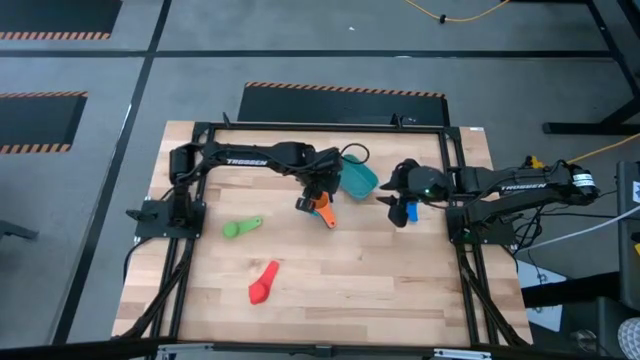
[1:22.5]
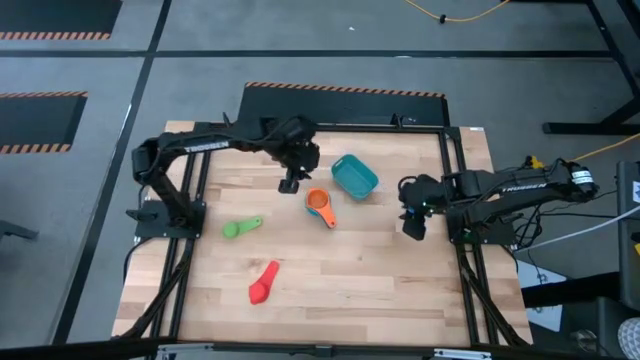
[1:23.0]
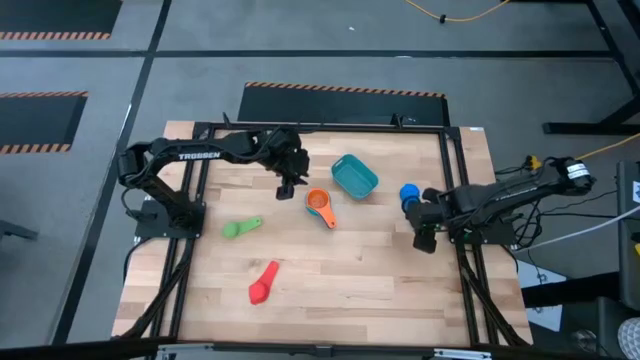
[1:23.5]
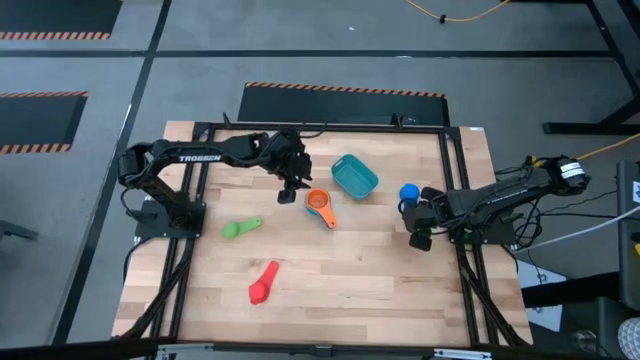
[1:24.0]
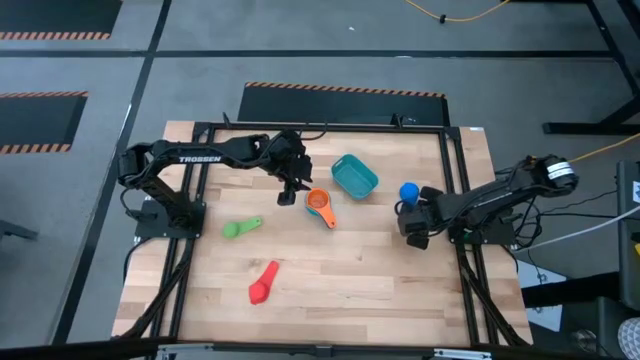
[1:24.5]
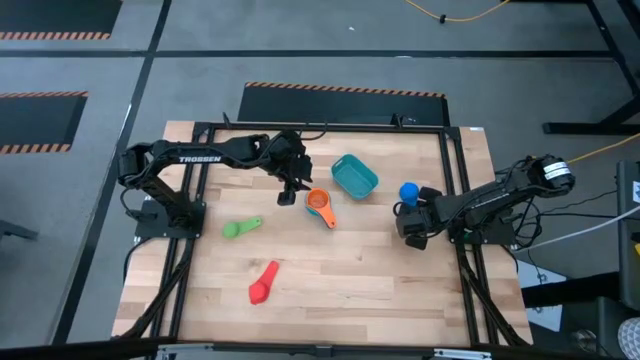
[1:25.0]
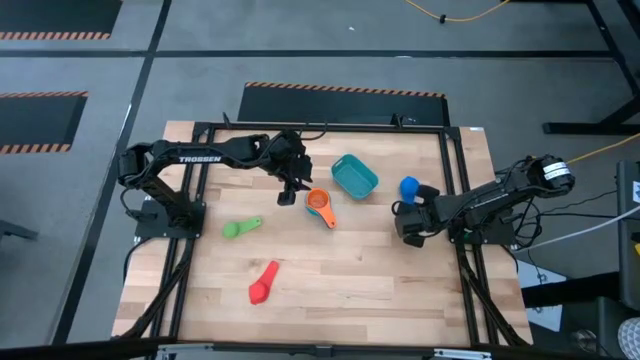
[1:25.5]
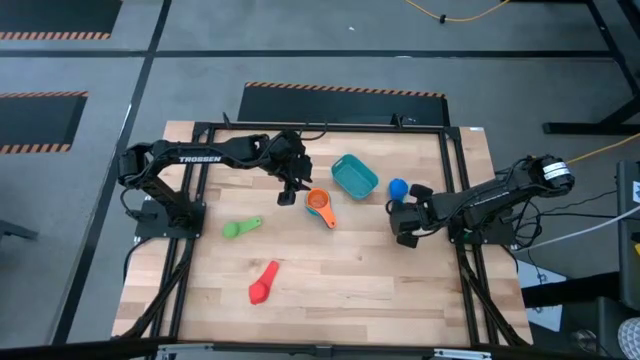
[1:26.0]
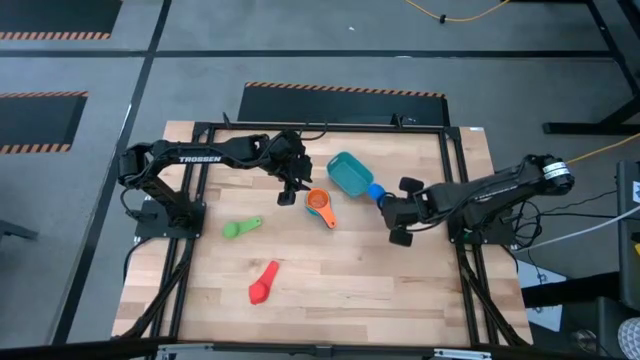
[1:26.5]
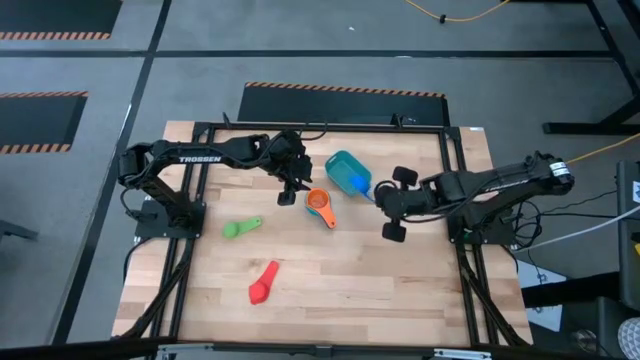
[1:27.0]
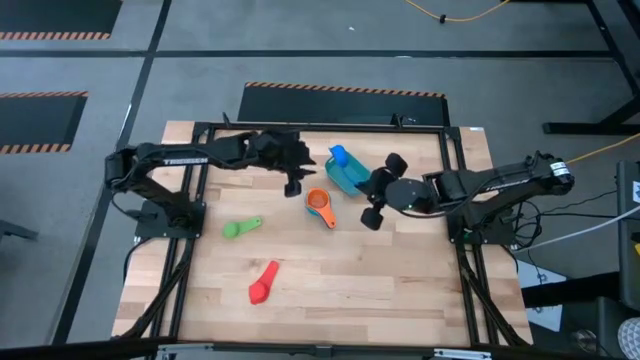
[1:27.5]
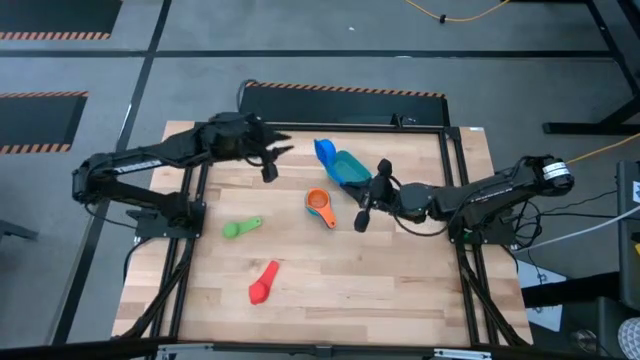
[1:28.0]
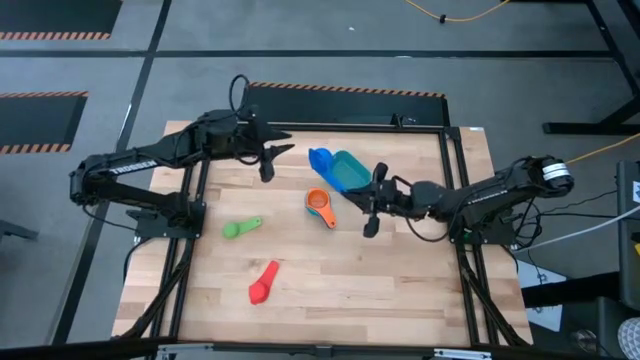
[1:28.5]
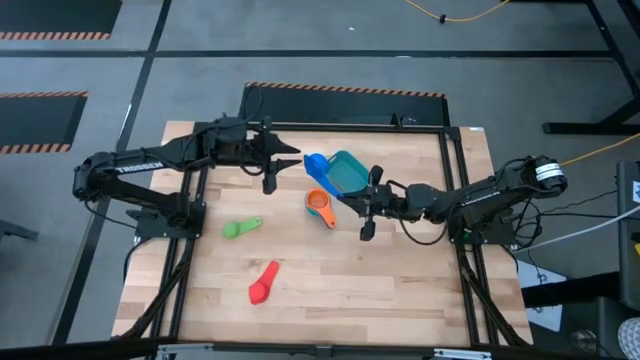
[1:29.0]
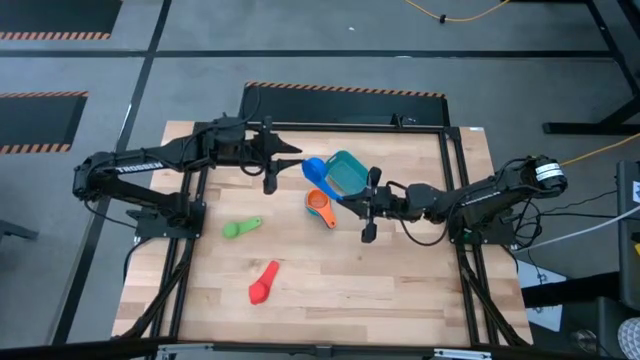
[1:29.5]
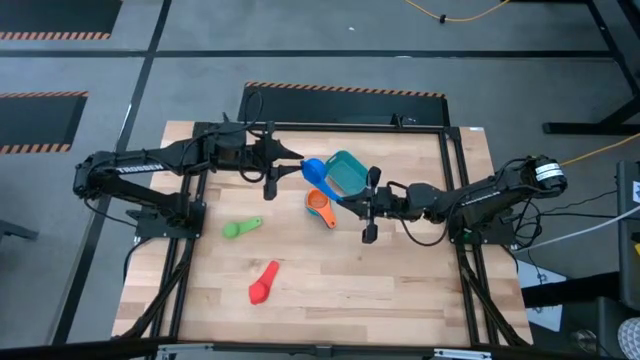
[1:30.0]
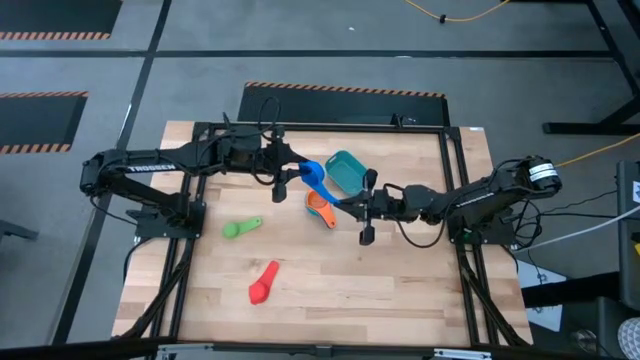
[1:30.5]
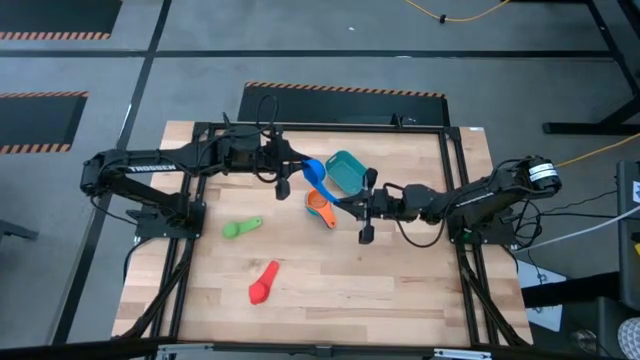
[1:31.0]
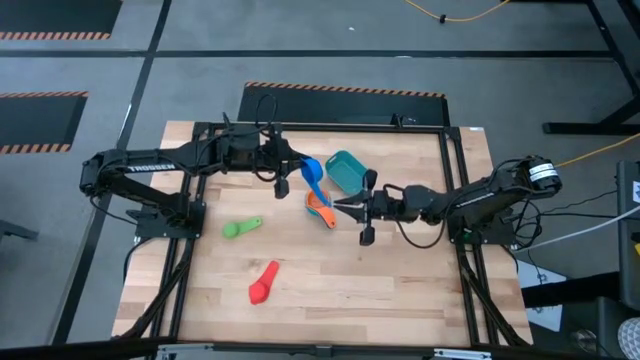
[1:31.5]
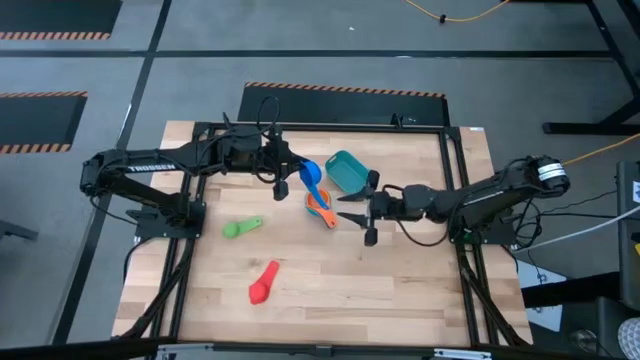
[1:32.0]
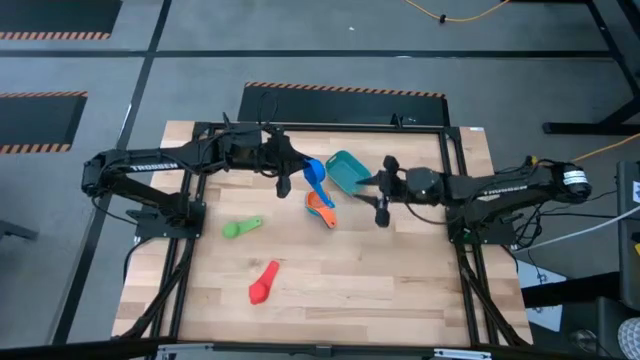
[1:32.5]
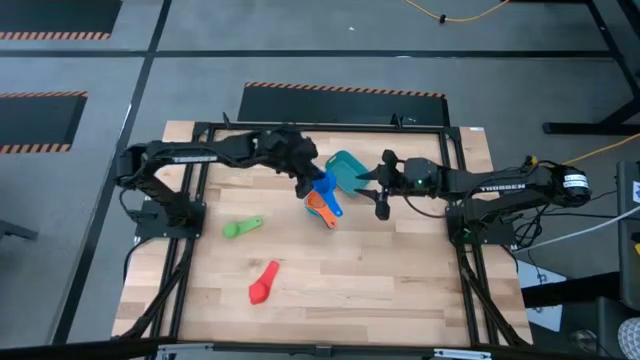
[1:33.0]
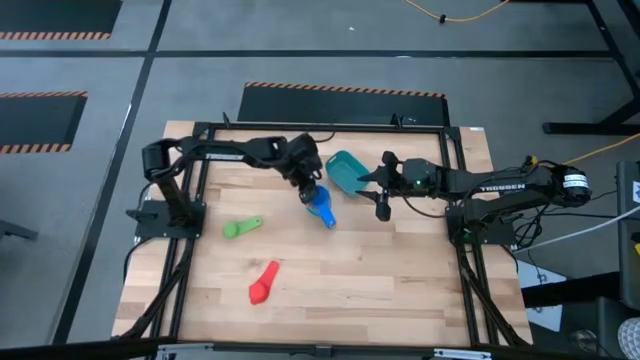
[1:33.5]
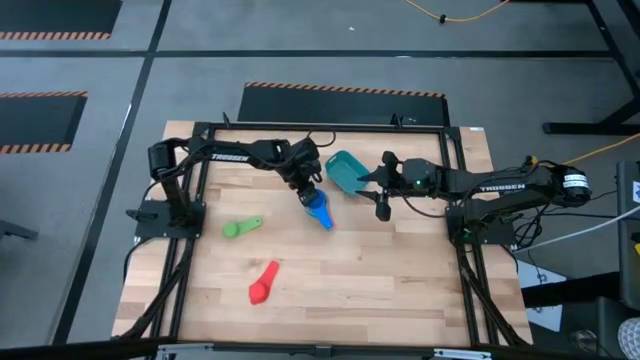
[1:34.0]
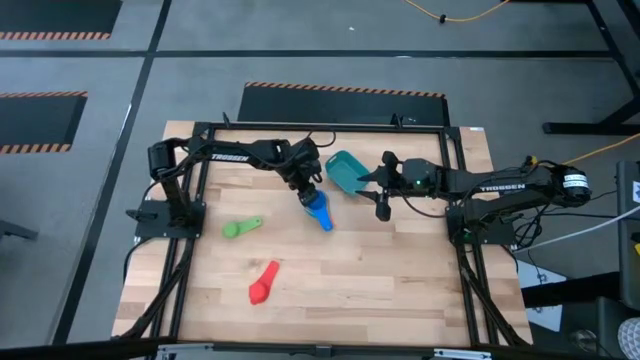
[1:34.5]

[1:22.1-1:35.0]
Task: Nest measuring cups in basket
Stack the blue measuring cup on top of the orange measuring cup

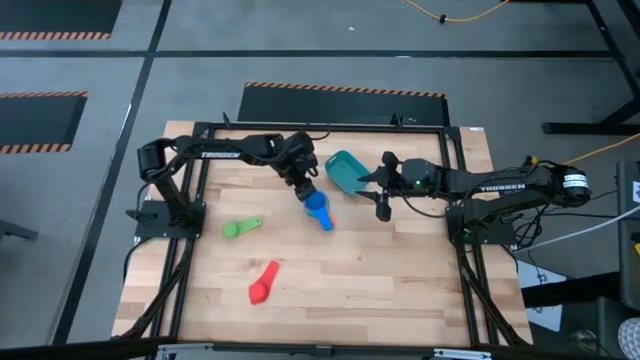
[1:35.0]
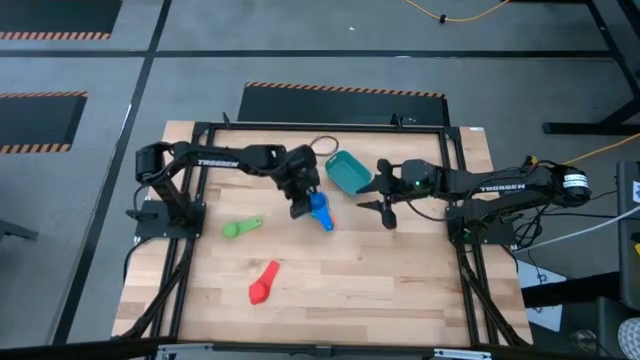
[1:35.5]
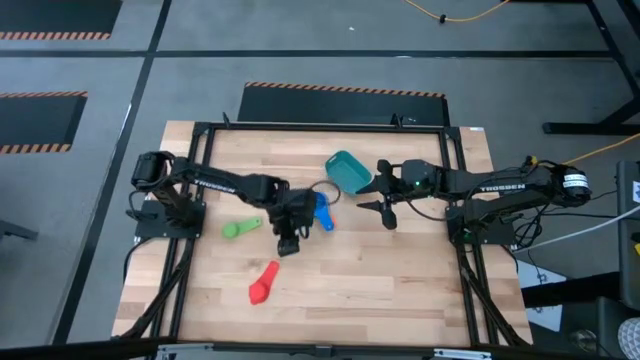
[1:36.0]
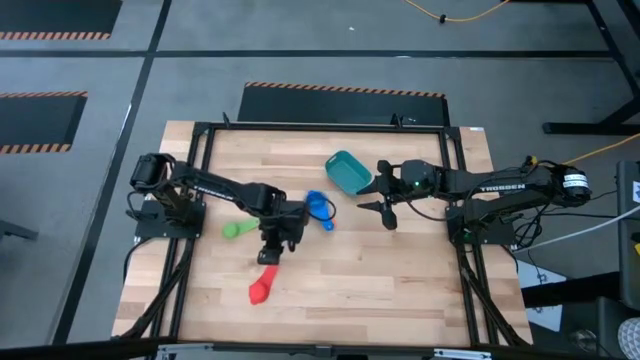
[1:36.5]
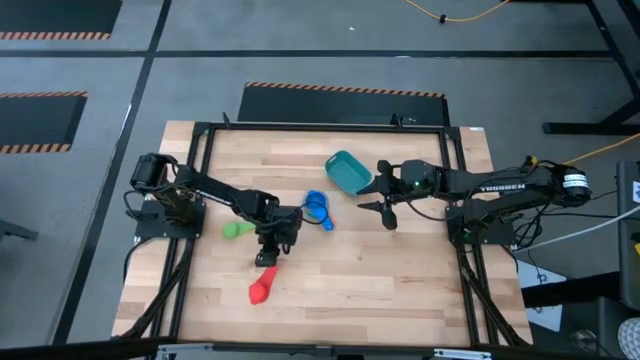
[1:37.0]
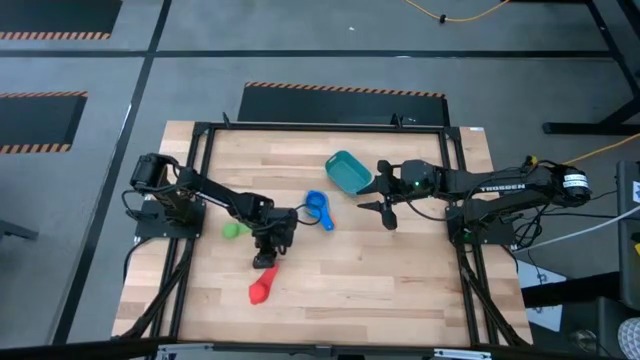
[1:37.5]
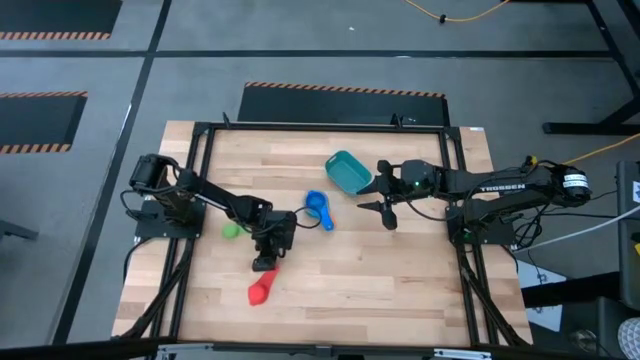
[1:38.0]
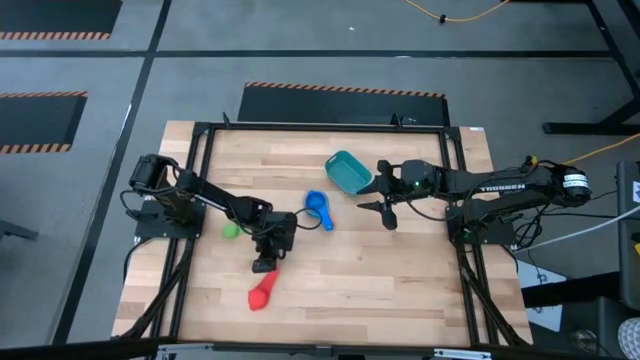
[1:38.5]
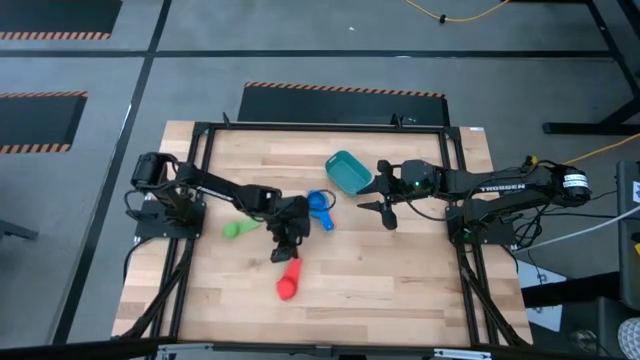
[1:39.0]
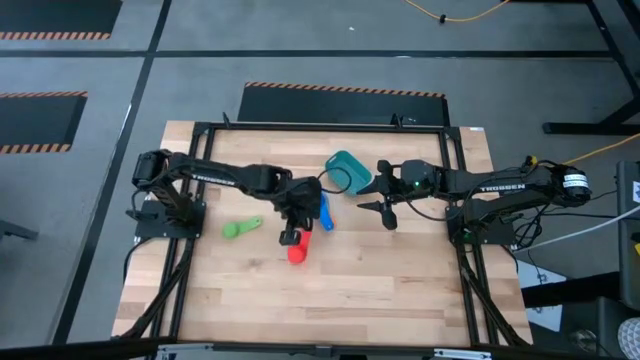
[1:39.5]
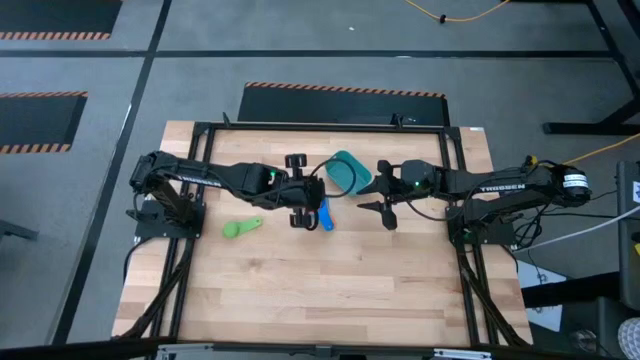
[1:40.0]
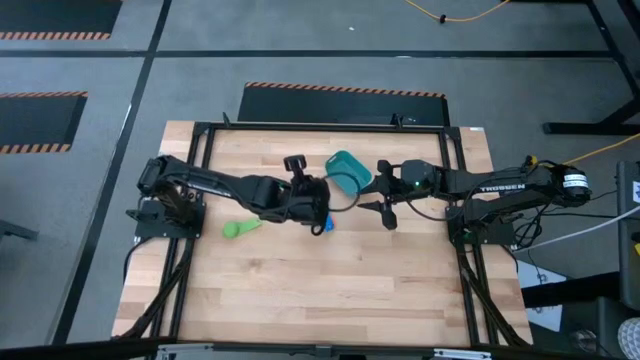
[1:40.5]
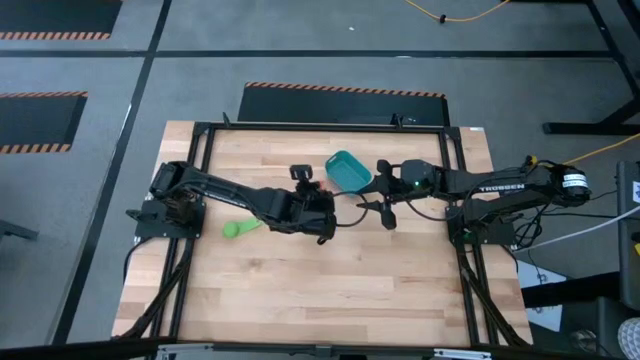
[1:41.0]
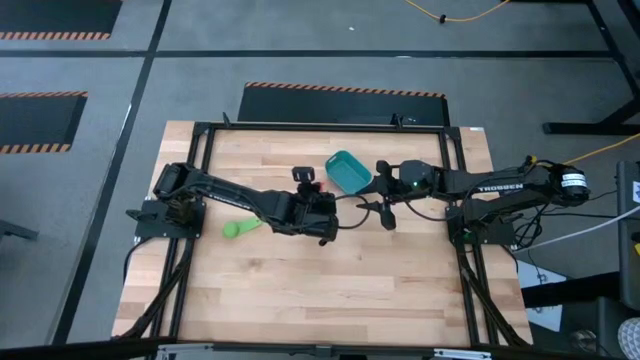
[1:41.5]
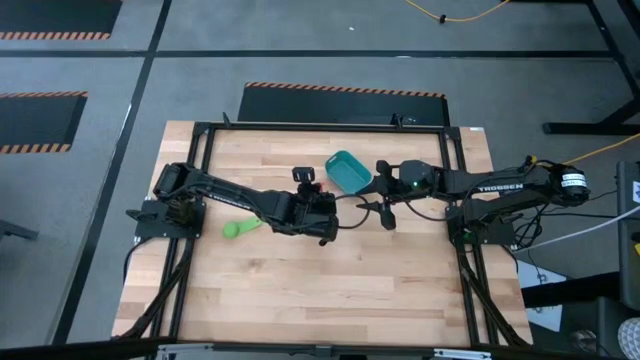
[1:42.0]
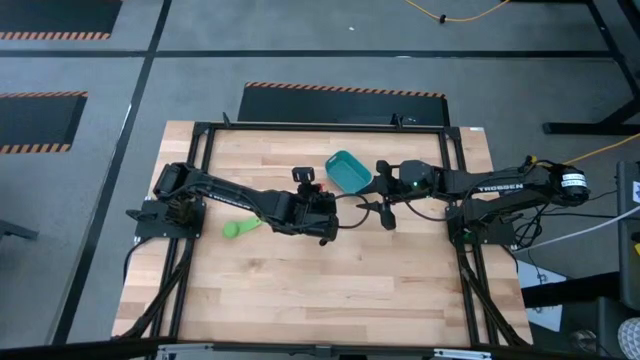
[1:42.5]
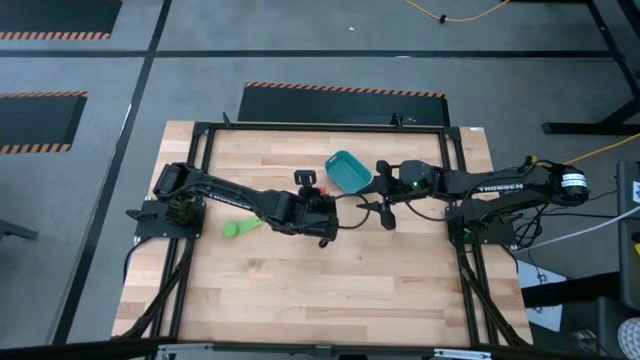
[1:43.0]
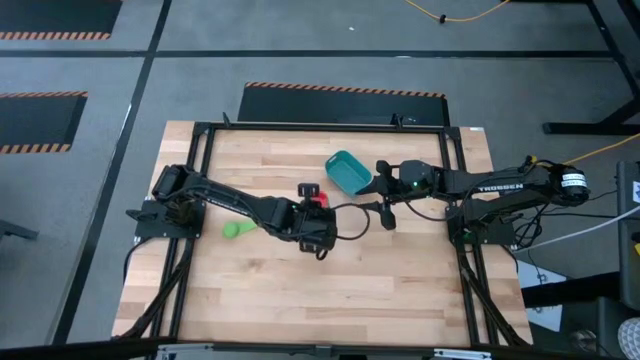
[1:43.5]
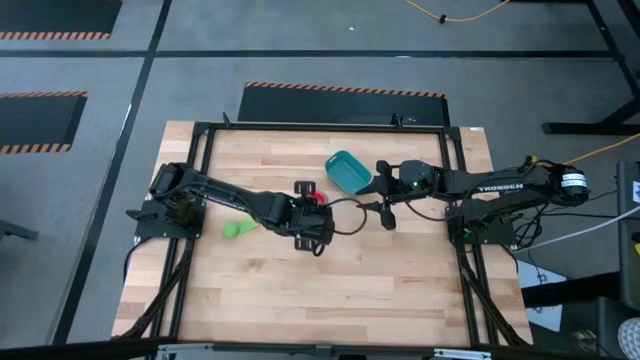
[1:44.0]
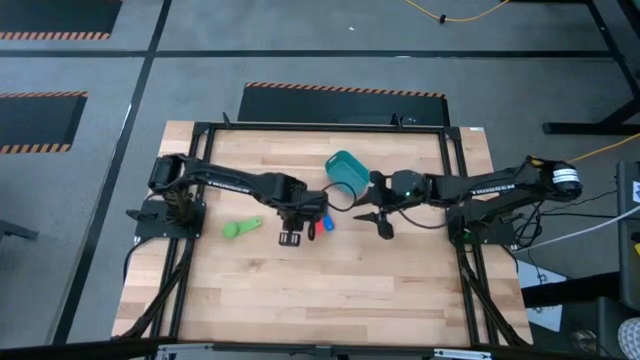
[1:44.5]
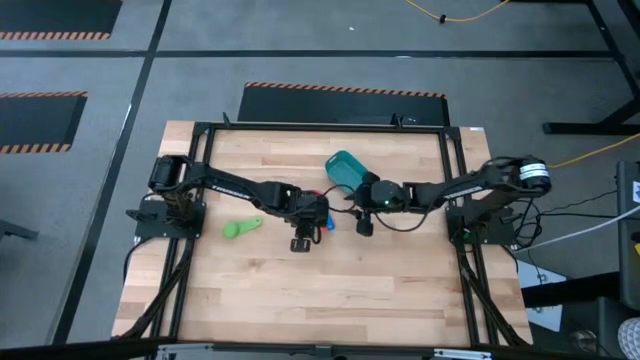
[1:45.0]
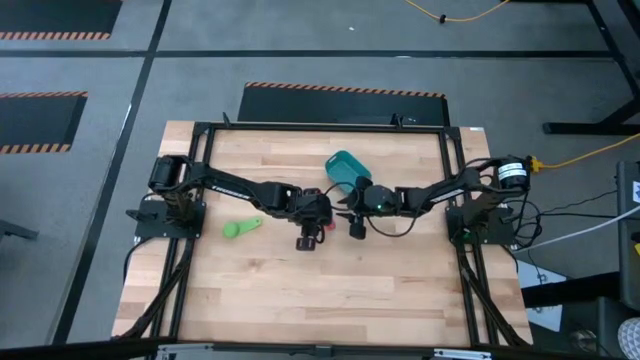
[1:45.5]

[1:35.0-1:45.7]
Stack the red measuring cup on top of the blue measuring cup
